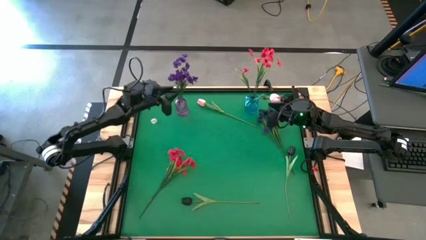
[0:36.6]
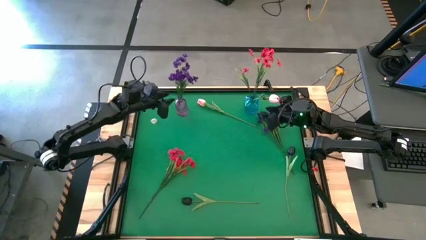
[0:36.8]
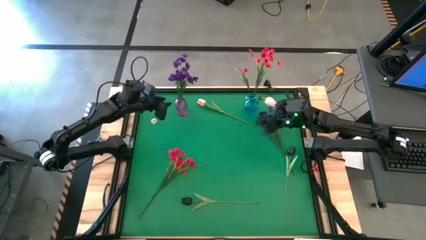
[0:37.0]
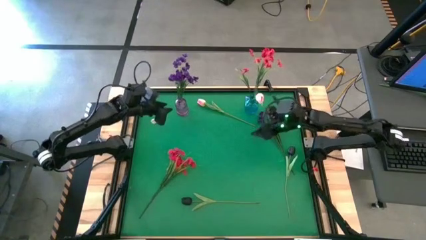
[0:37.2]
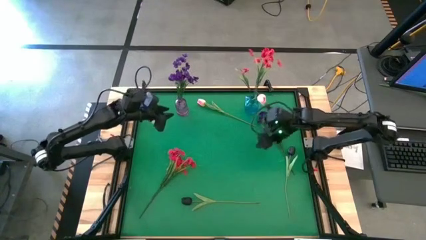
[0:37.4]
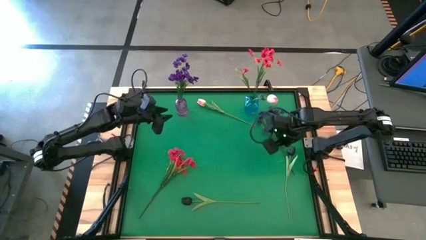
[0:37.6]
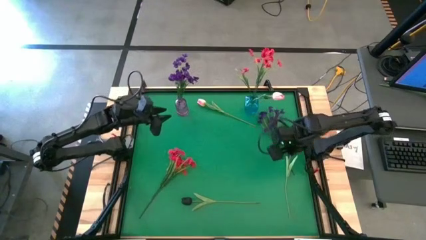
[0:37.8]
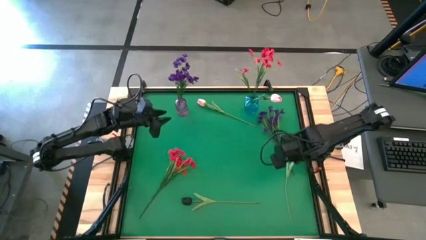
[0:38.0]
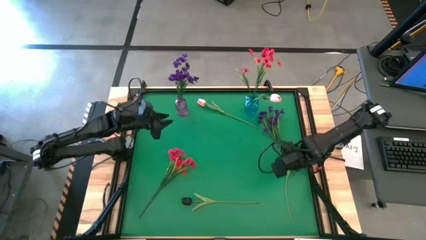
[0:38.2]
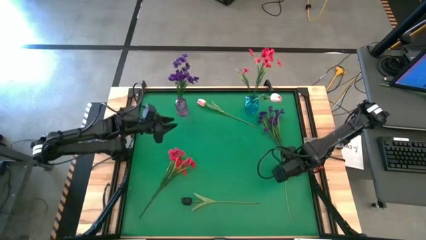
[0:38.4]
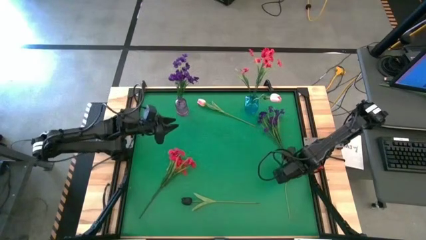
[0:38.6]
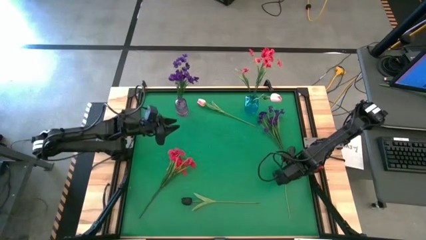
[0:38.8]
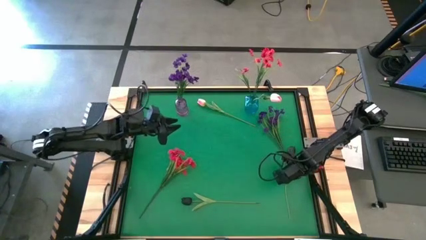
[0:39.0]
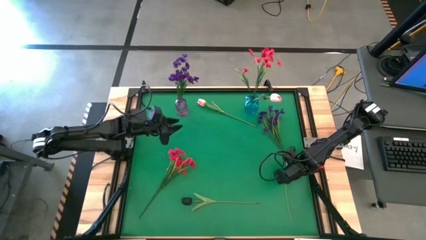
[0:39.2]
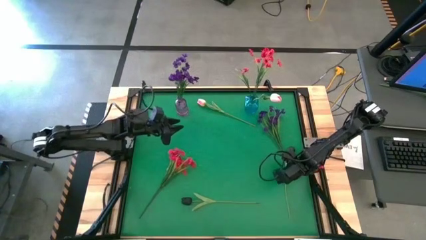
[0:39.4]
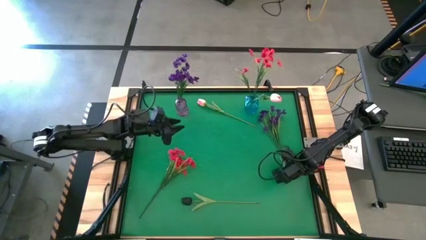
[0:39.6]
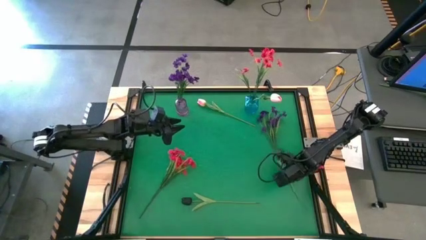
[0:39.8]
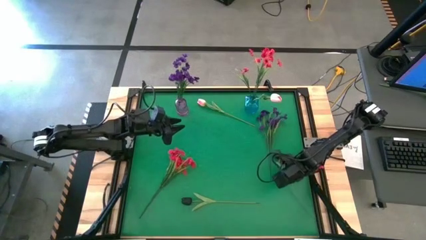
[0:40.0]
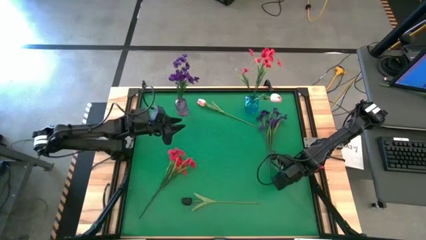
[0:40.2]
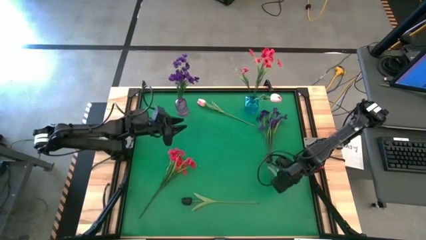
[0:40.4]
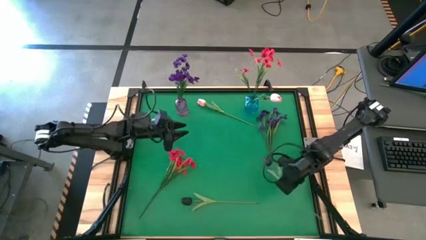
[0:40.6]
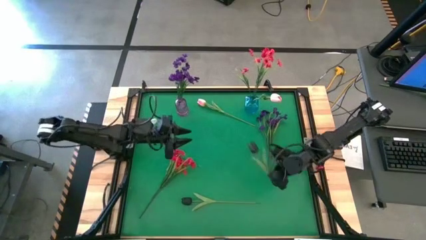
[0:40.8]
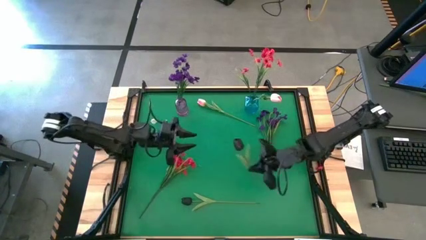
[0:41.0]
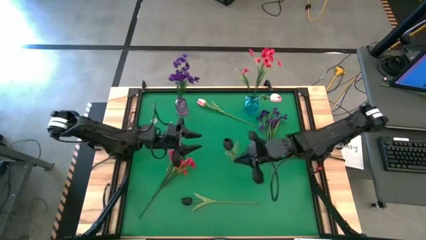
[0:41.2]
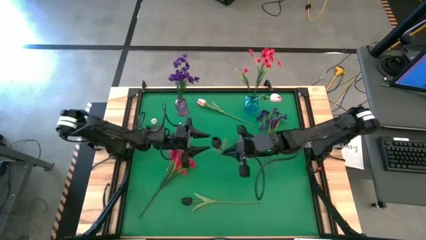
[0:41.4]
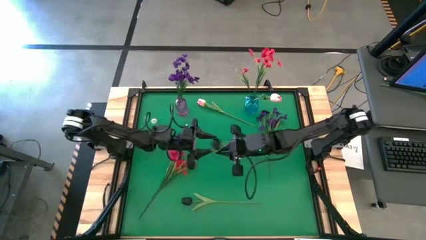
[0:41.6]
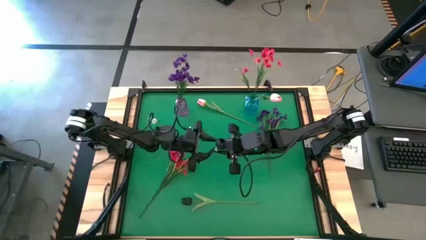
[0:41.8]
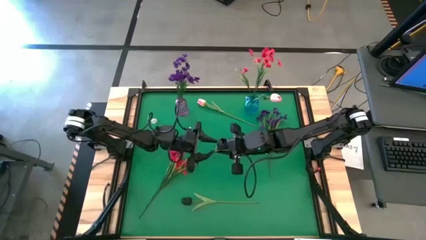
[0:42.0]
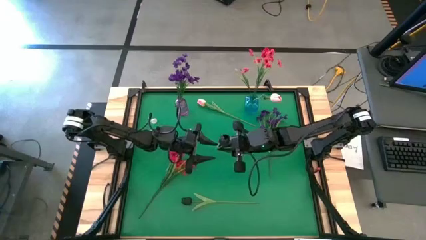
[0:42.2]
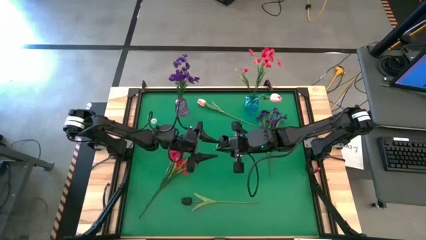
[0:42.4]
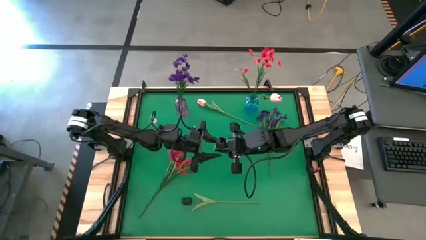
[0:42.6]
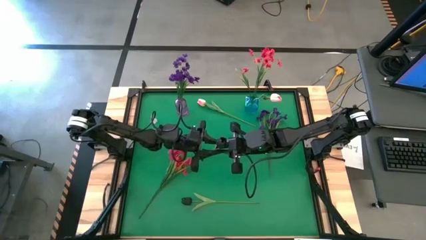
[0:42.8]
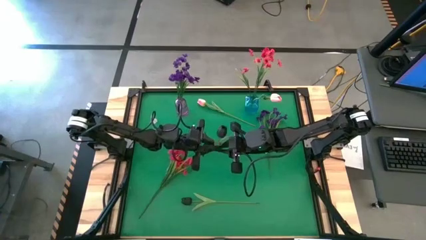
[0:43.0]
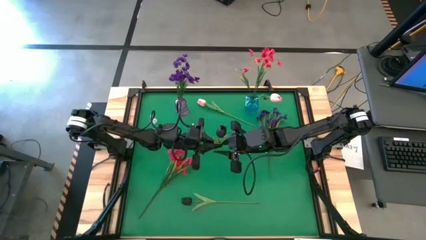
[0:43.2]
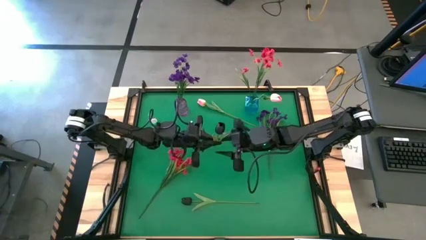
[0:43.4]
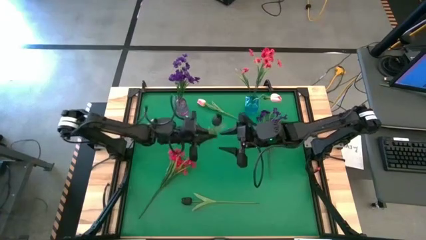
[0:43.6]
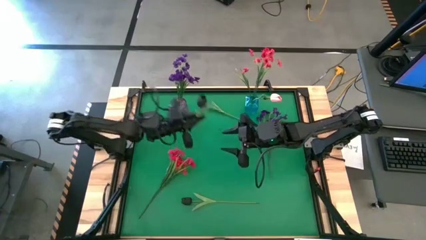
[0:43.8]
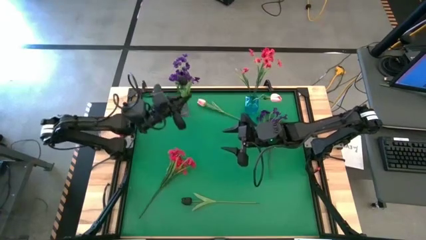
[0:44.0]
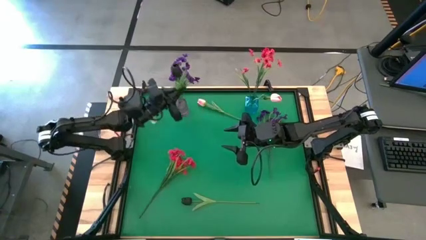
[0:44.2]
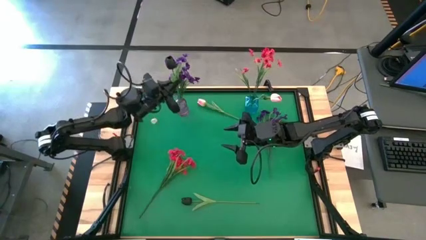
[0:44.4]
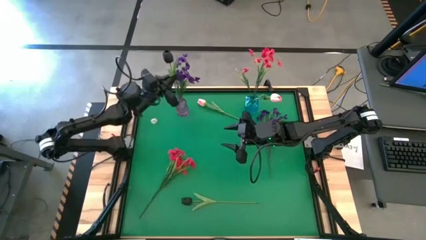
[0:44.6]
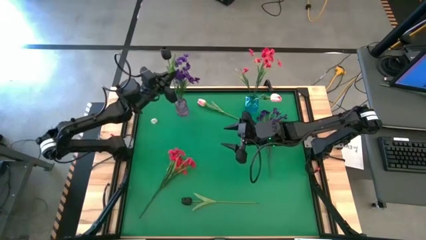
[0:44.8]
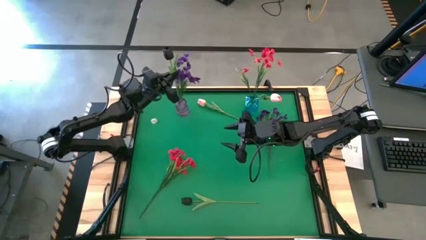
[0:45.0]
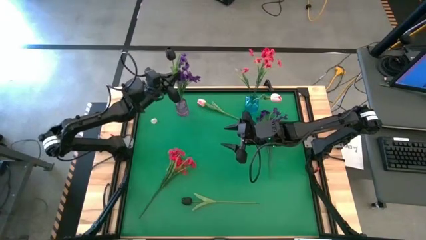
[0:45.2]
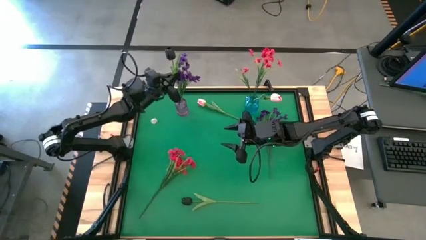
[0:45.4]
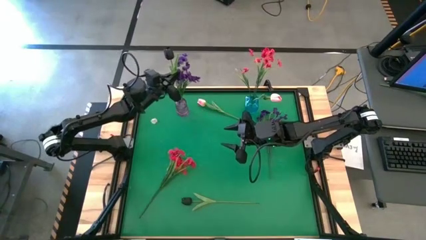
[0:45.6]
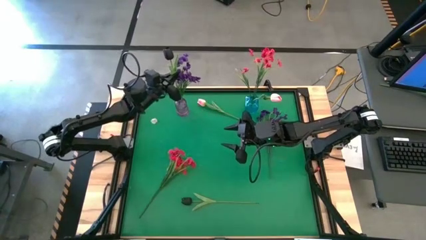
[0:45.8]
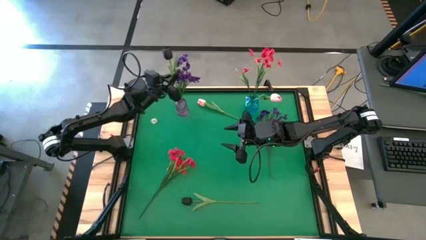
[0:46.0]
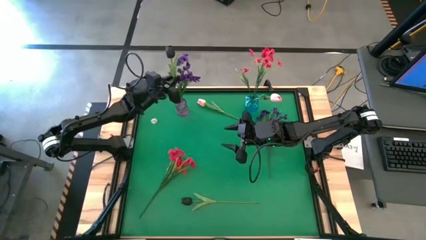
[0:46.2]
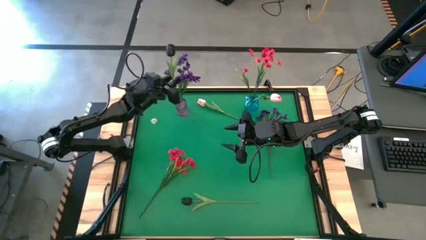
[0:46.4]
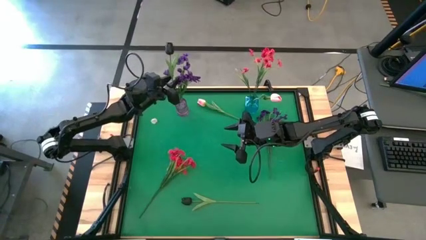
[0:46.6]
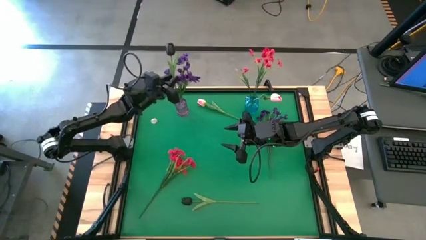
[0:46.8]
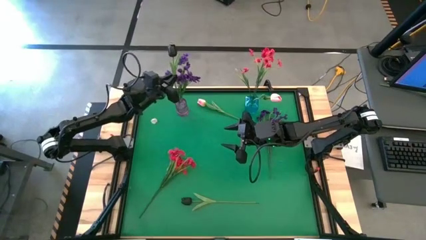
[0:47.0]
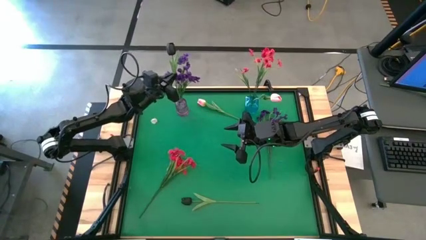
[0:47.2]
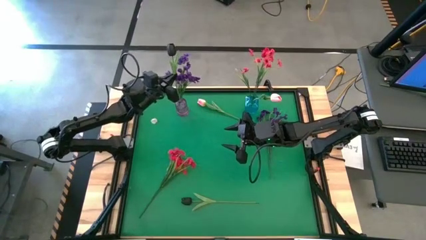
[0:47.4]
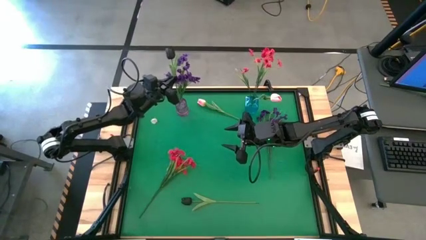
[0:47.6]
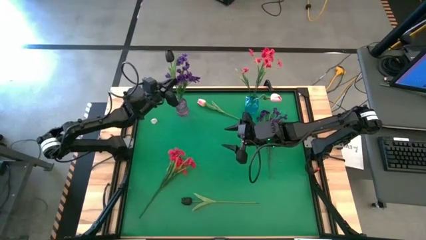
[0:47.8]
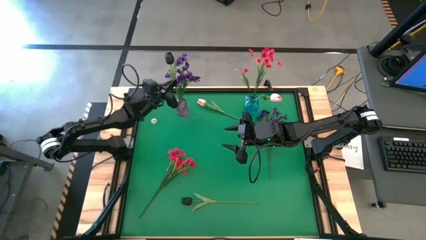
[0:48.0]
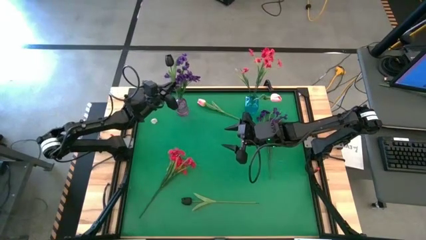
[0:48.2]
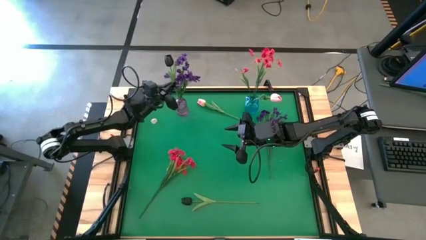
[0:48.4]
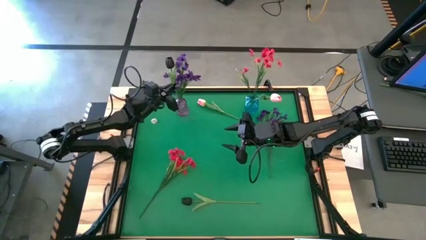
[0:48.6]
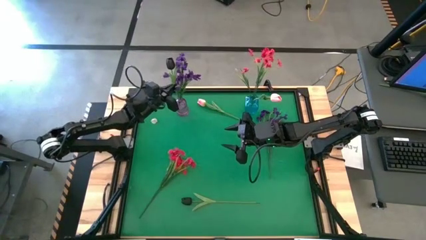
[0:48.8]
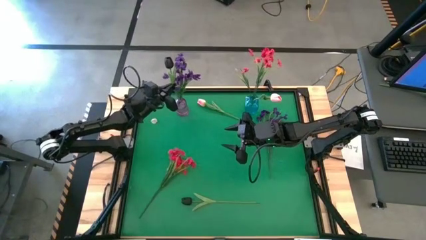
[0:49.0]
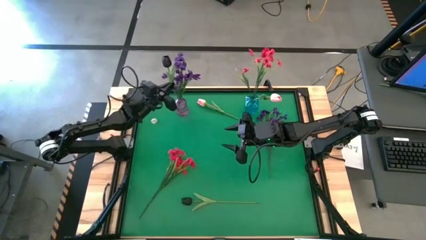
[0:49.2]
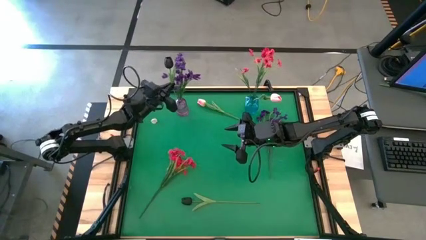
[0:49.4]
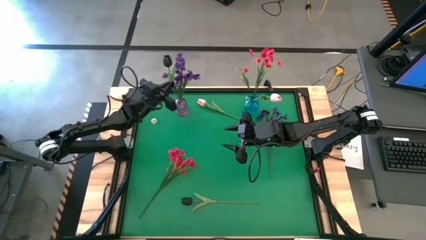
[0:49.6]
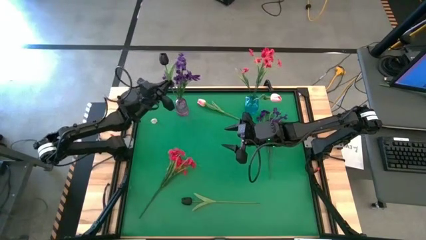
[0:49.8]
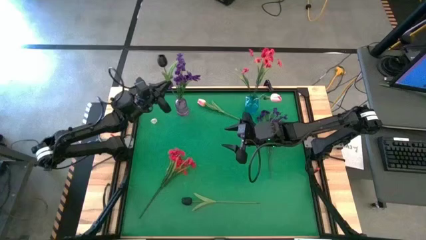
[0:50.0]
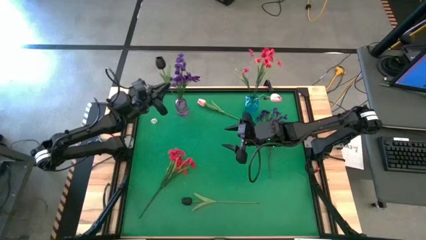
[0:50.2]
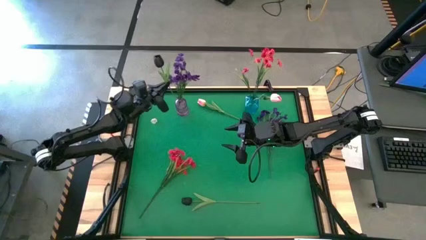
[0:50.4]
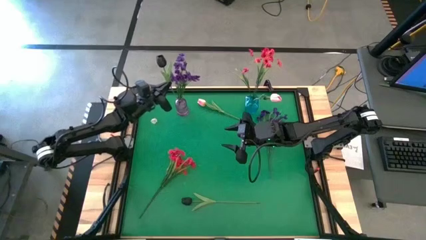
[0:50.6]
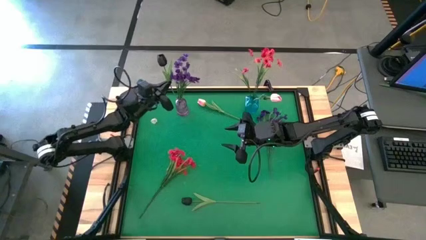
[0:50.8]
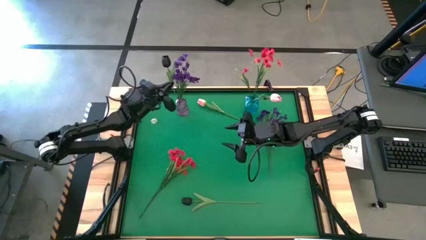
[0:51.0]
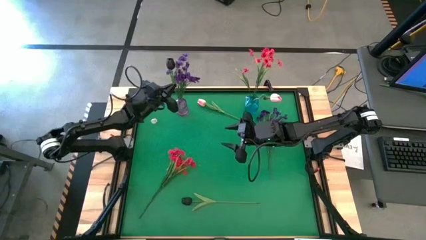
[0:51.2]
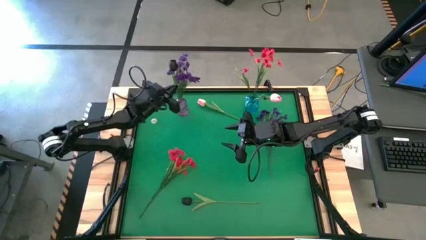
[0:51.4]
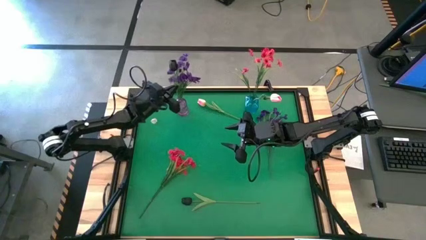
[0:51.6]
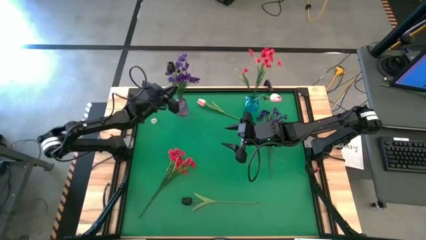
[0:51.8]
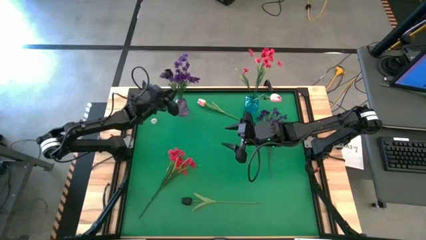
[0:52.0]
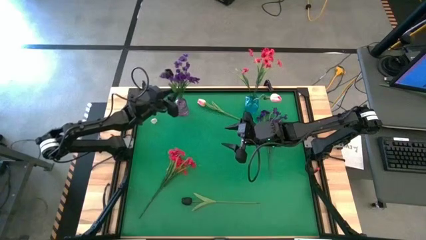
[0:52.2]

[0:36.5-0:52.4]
Task: Sort flowers into vase by color
Put the right black flower into the violet vase

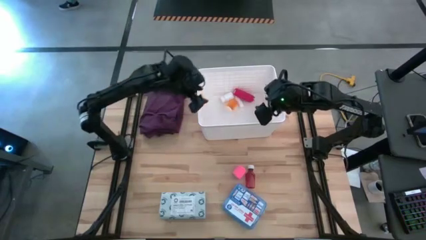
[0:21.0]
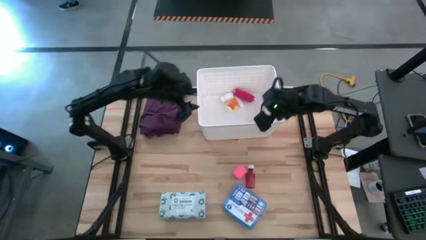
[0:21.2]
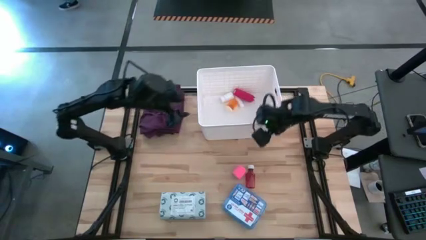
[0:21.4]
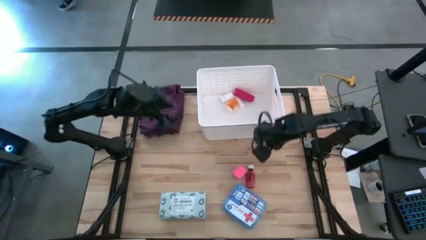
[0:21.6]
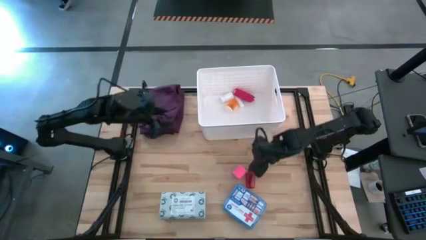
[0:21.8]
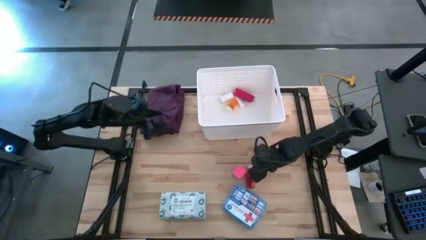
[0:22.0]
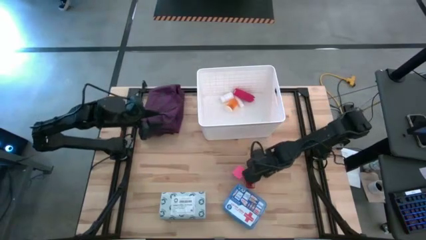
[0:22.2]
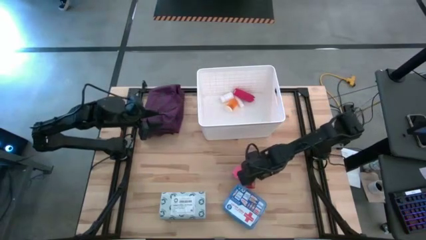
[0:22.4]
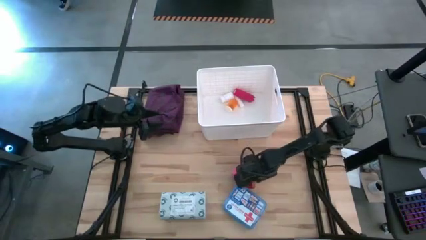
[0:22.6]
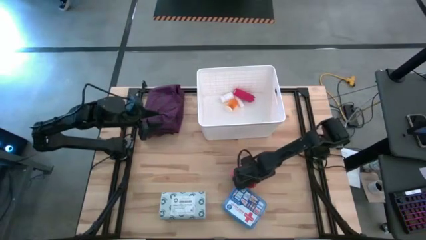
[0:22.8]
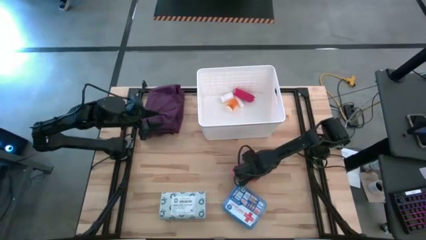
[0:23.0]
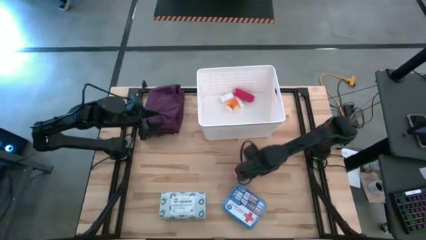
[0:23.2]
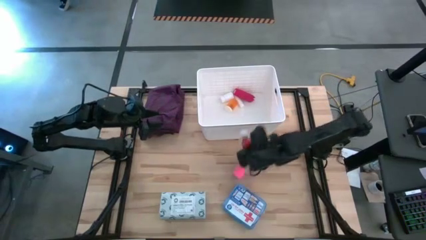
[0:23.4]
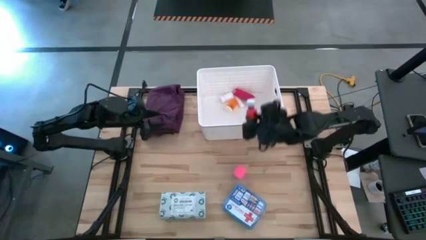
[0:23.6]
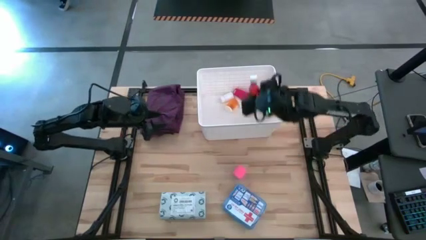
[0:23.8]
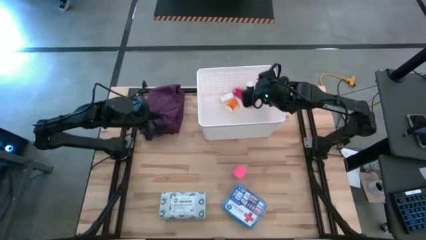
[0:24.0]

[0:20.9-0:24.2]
Task: Pick & place medical supplies in basket/bin
Put the pill bottle into the bin
